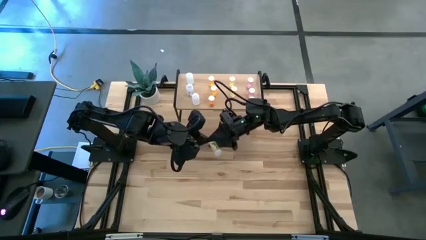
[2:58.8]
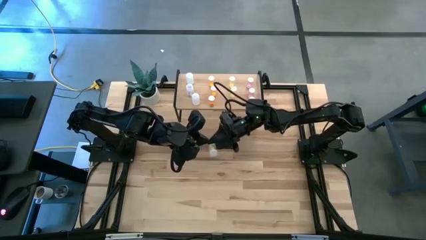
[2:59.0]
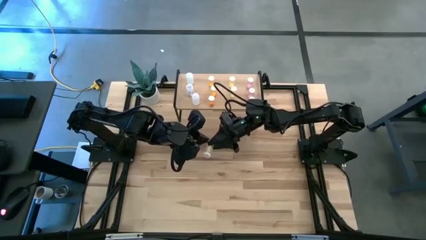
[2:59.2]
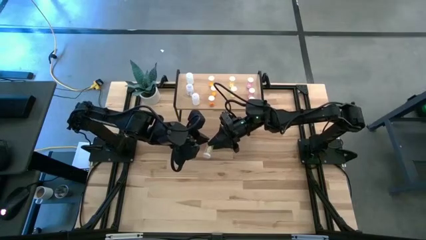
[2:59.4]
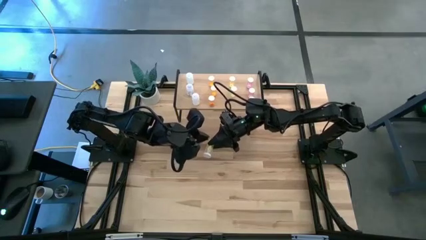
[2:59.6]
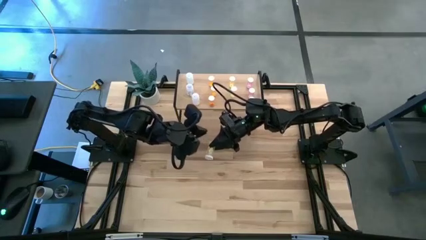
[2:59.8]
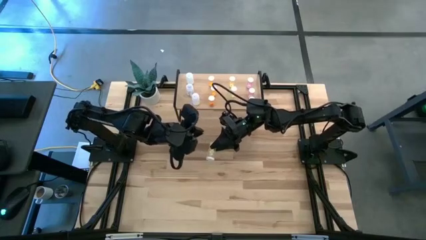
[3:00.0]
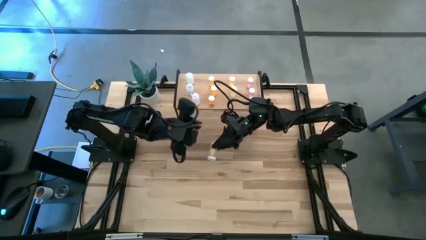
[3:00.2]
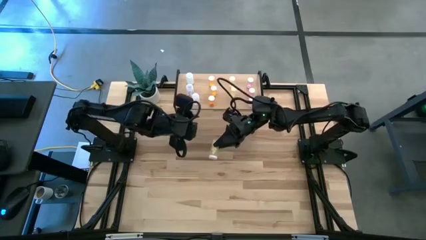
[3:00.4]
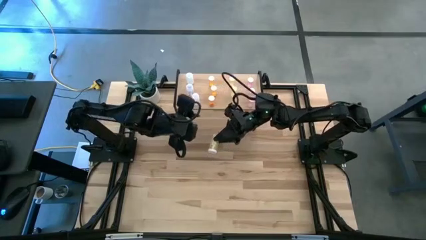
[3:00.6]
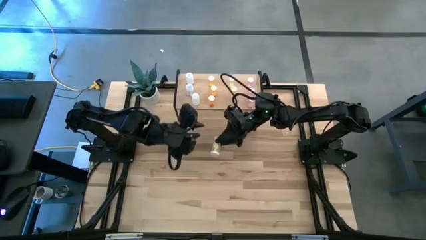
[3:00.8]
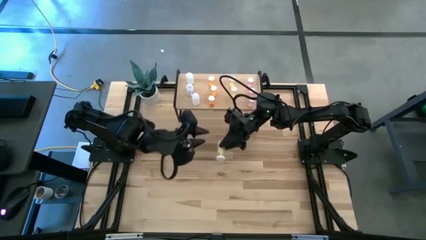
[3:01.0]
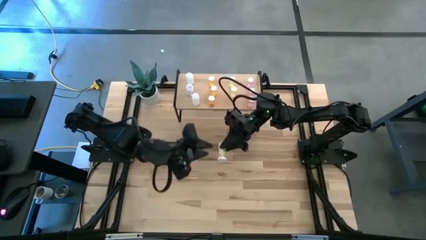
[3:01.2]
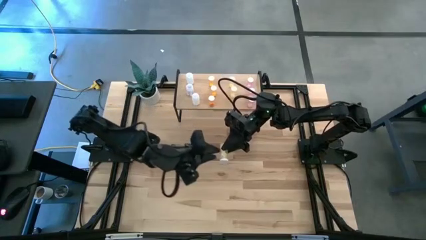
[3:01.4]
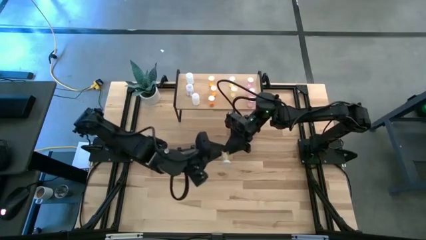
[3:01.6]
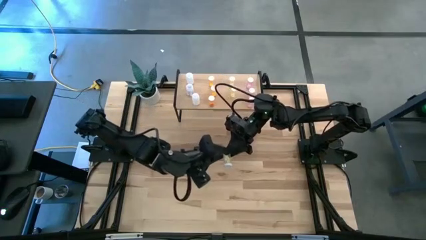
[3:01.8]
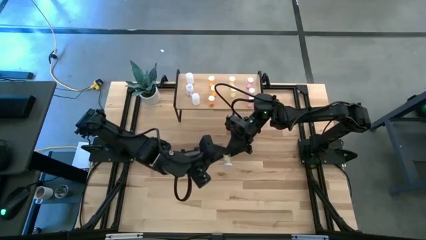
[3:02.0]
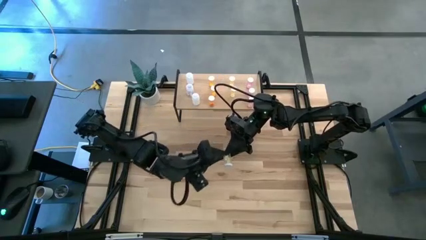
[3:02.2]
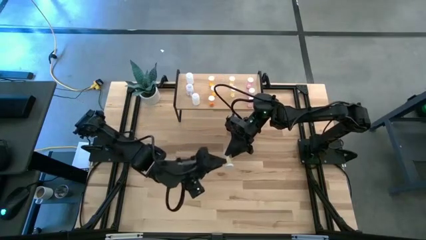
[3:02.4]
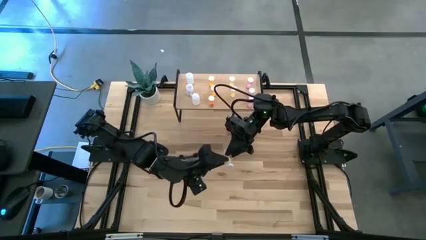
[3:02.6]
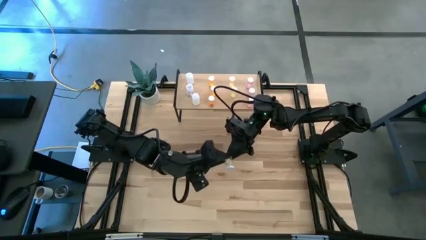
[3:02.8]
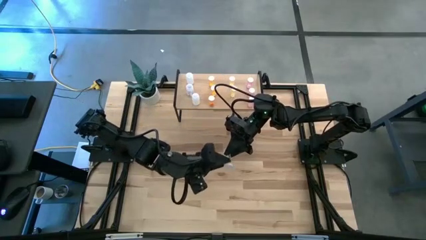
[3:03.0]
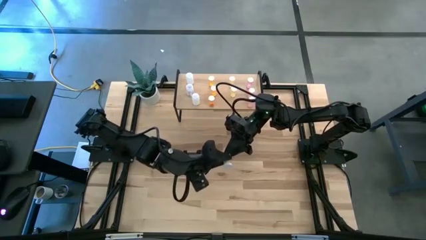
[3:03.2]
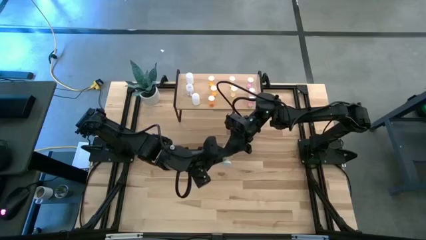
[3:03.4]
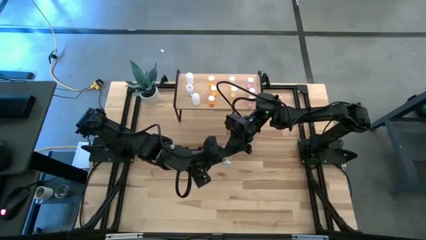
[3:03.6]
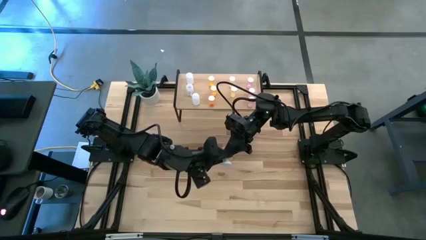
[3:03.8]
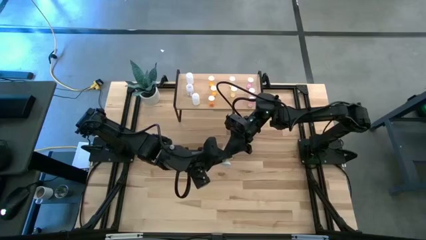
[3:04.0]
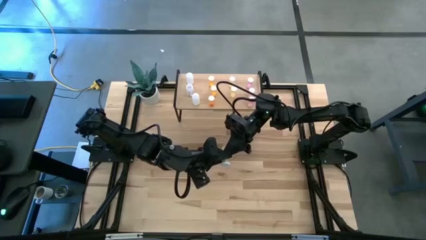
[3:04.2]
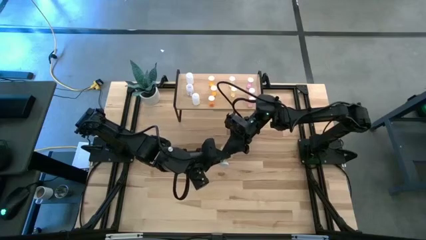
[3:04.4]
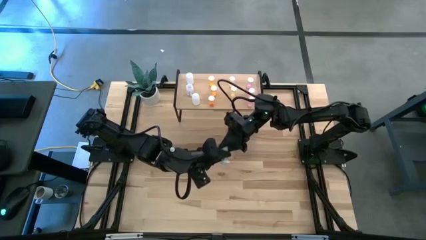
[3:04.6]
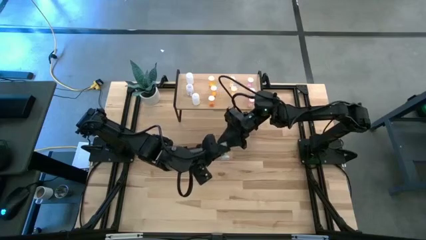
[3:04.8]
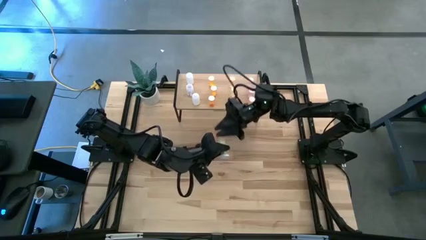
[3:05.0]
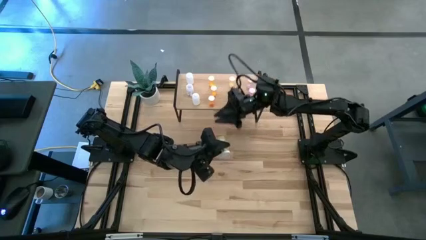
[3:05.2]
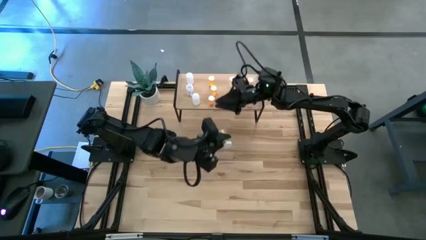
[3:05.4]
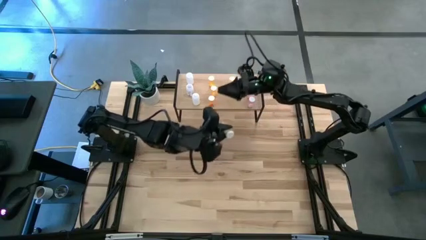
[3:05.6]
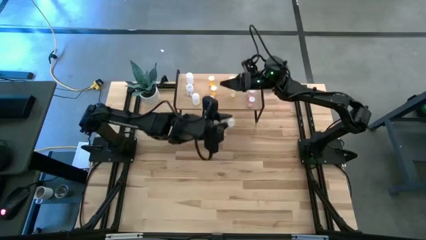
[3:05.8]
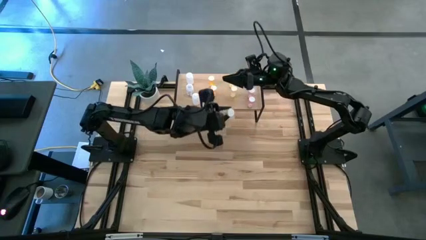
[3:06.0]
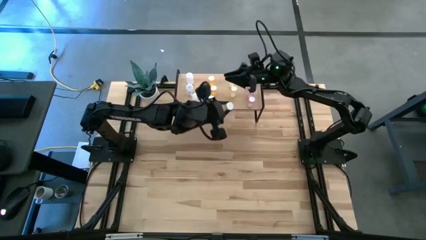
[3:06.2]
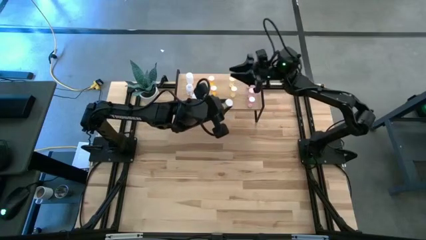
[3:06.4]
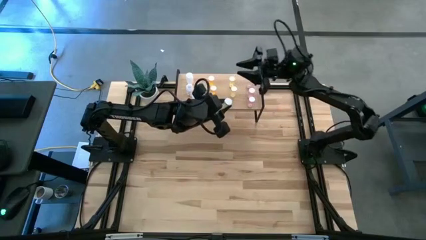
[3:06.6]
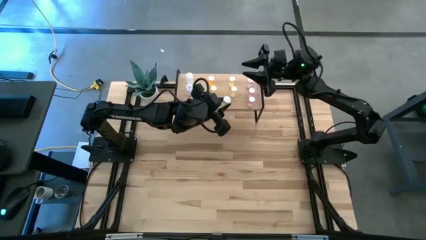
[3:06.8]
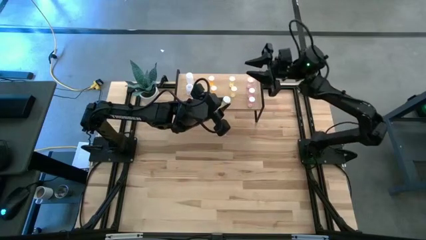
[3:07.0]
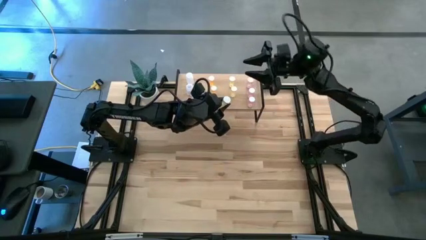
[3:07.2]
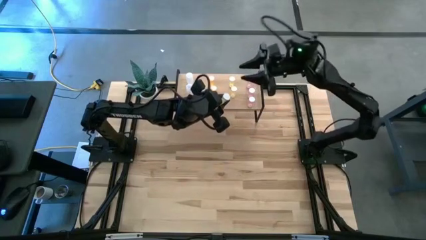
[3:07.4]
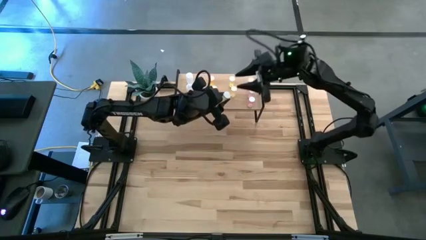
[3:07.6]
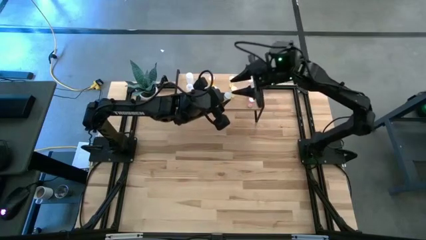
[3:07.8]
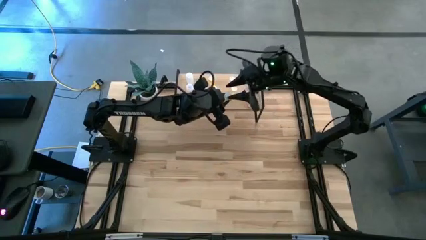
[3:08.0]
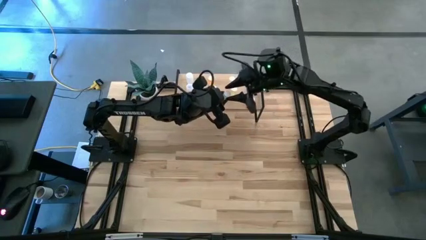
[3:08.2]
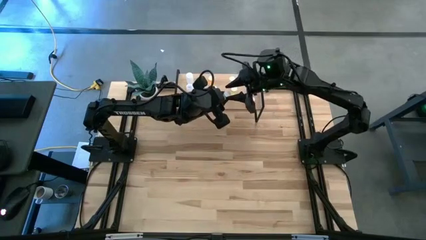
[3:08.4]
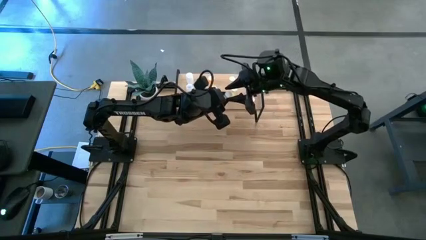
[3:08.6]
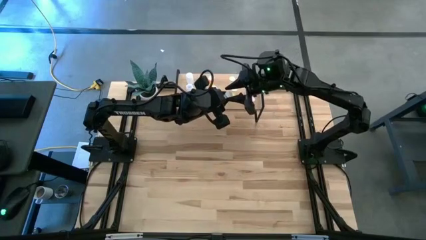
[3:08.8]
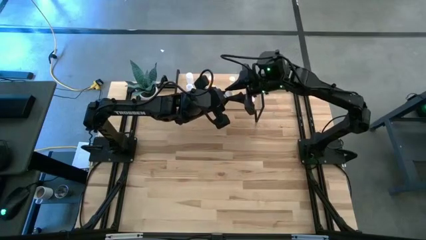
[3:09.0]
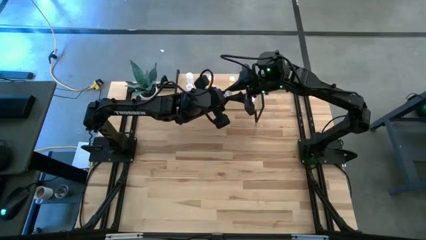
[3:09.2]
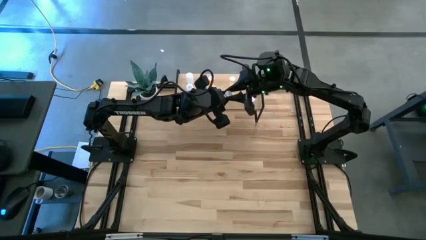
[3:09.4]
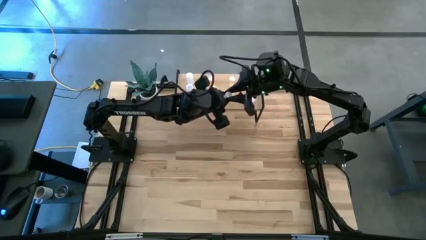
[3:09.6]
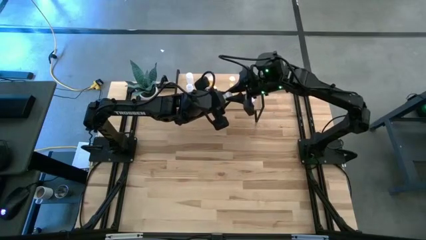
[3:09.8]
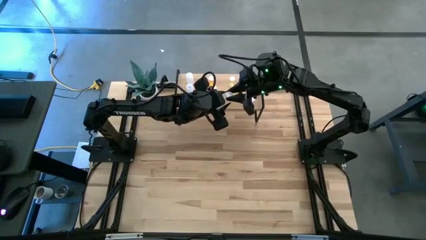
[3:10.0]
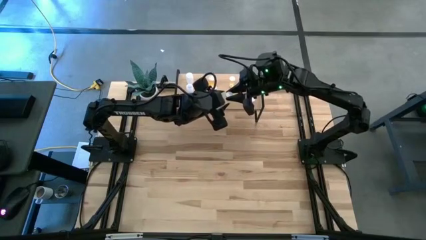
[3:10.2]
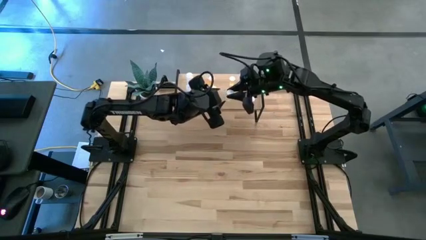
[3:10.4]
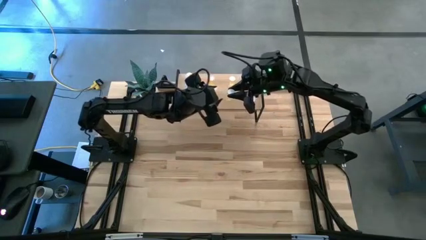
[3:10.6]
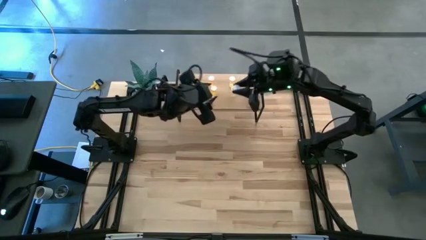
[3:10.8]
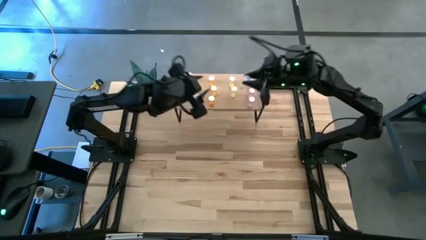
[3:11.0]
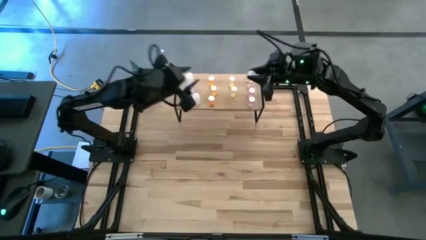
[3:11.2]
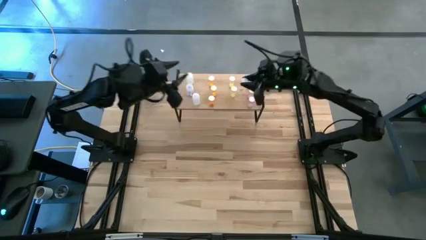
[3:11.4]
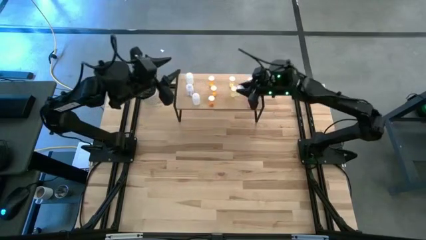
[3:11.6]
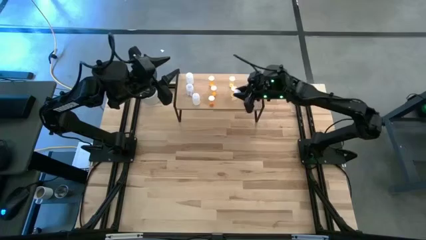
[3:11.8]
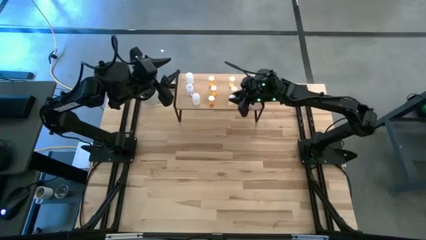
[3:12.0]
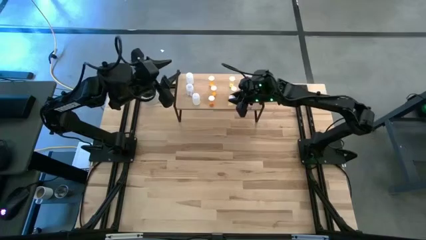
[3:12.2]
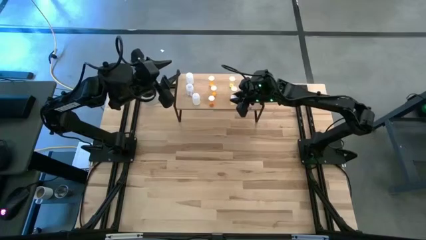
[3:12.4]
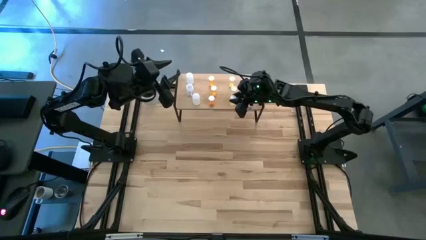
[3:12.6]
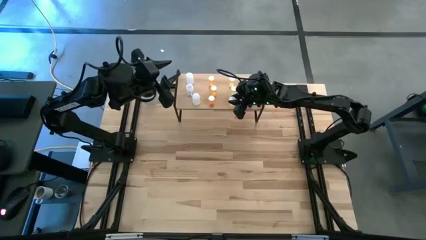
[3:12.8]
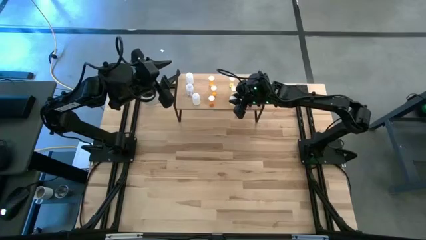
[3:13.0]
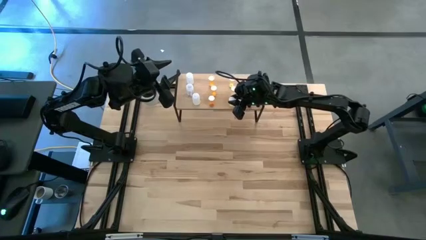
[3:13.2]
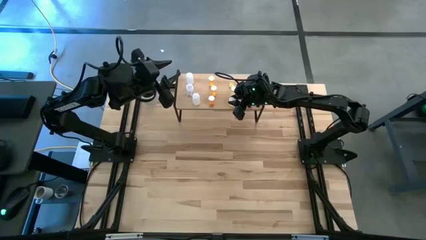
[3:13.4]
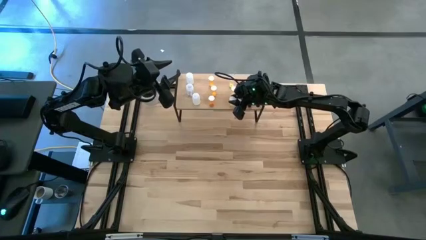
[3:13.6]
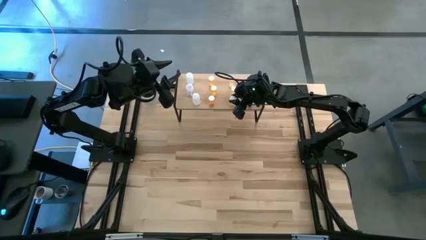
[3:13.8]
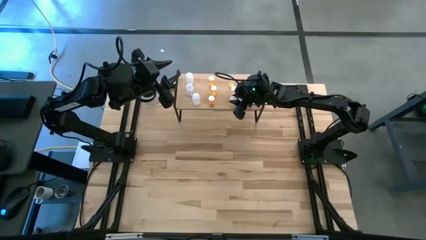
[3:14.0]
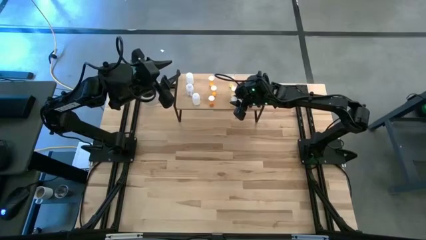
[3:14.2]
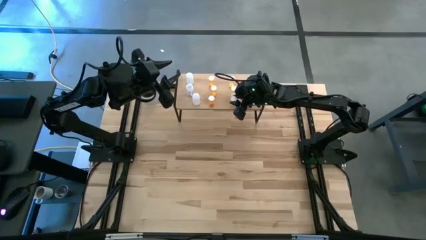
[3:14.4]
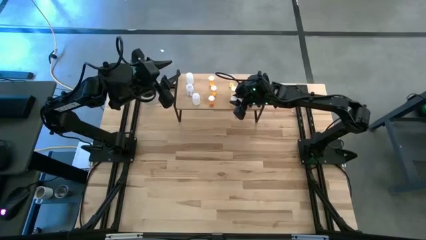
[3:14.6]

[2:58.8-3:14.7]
Task: Pick and place medicine bottles onto shelf by color
Put the yellow pill bottle on the shelf aligned with the other yellow pill bottle
